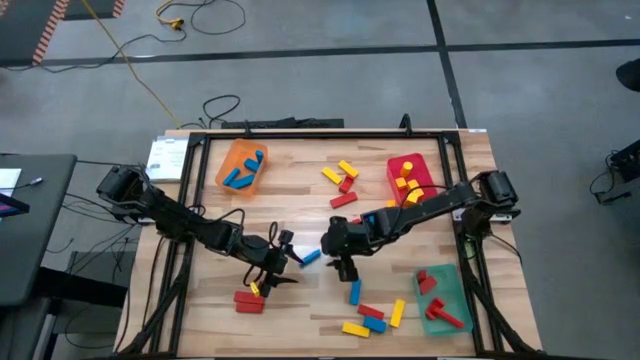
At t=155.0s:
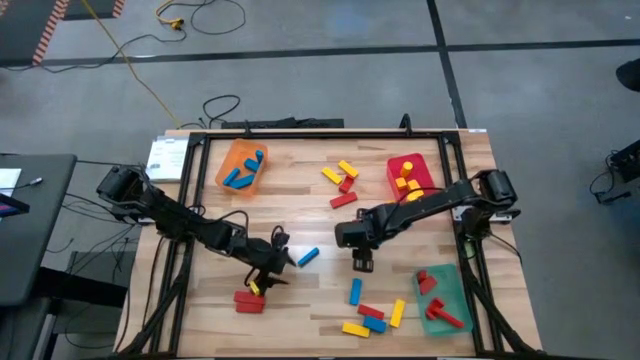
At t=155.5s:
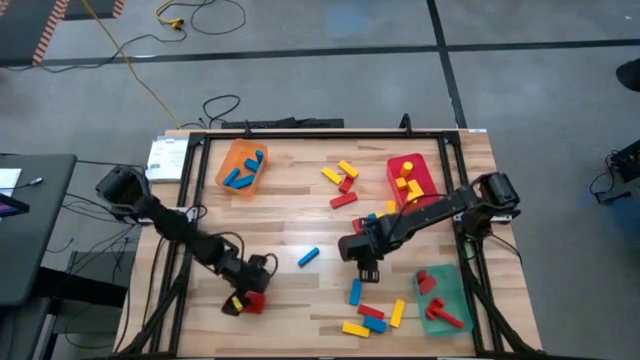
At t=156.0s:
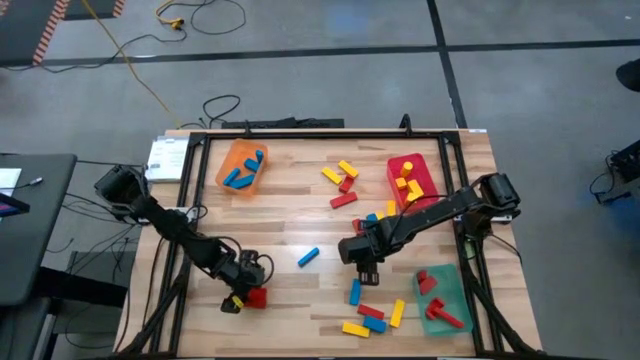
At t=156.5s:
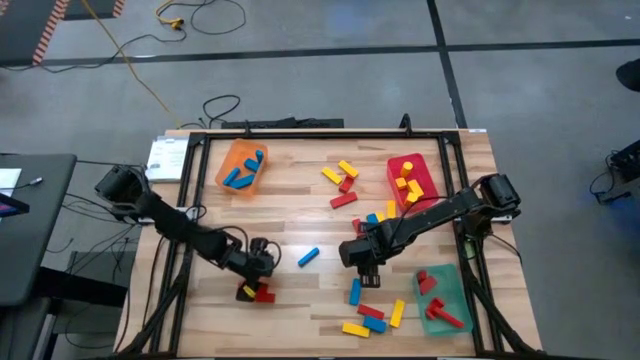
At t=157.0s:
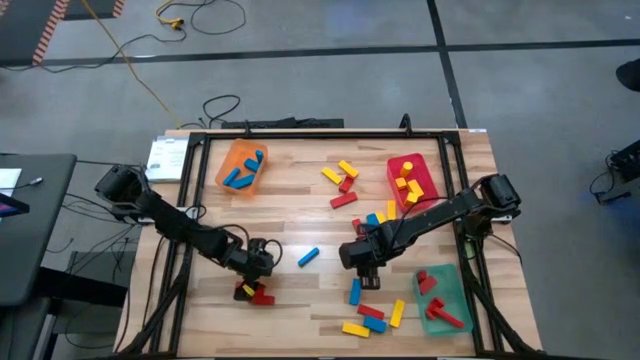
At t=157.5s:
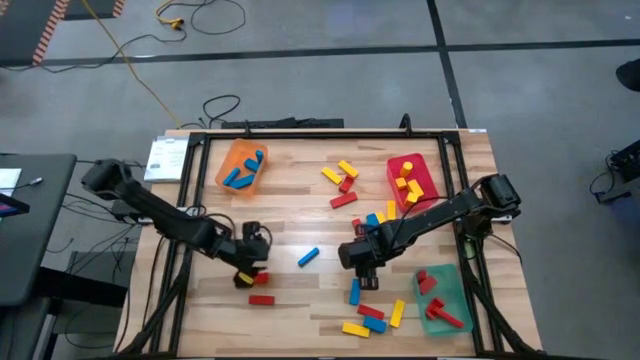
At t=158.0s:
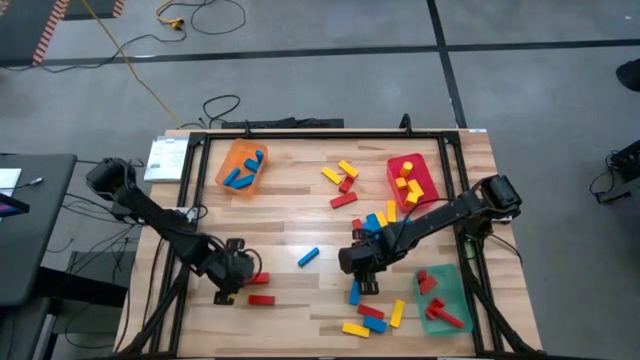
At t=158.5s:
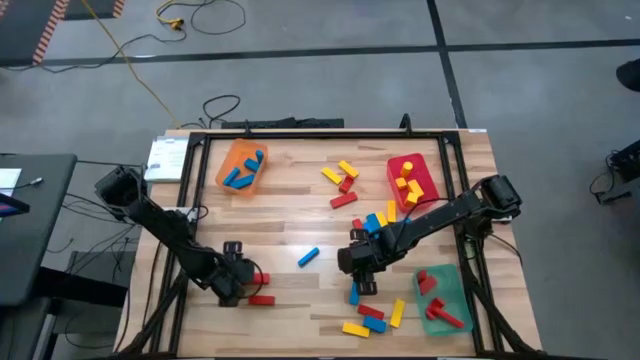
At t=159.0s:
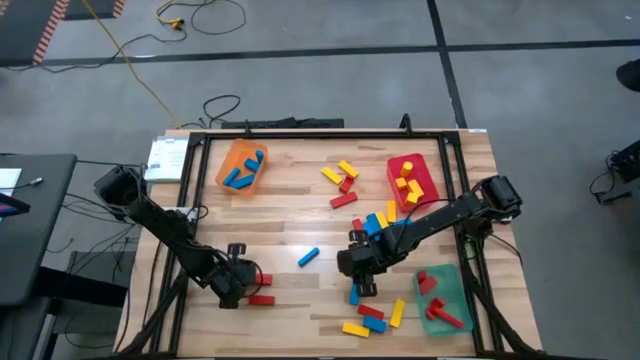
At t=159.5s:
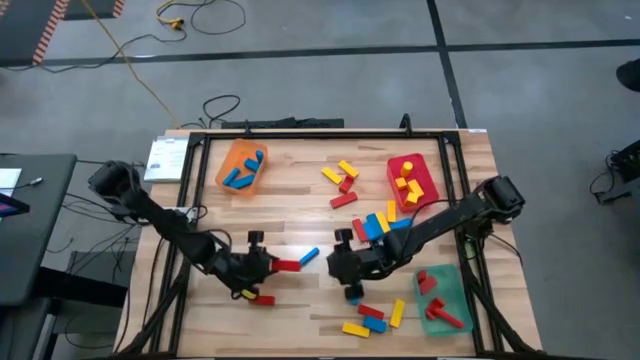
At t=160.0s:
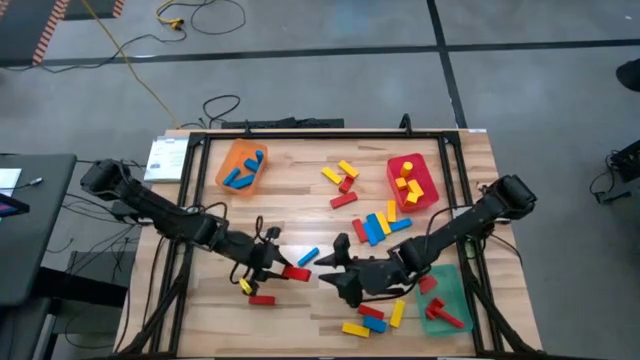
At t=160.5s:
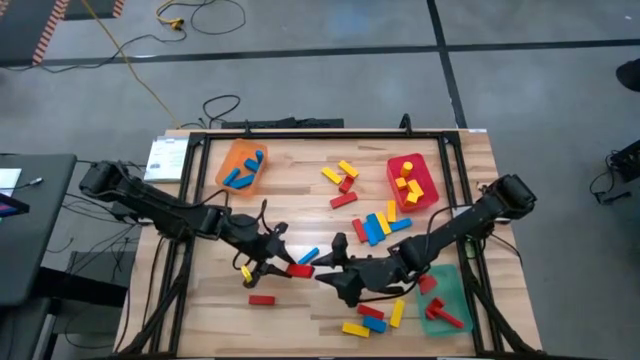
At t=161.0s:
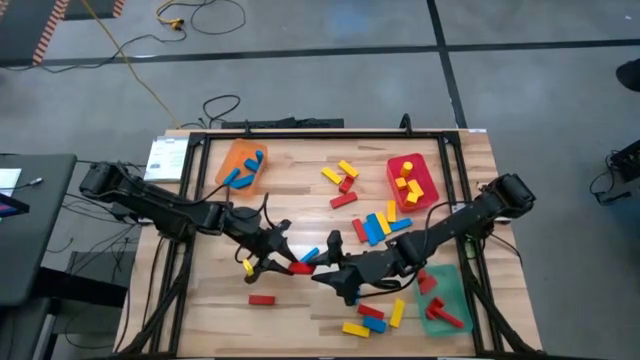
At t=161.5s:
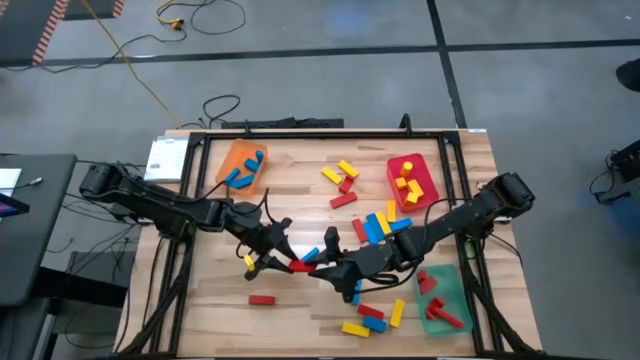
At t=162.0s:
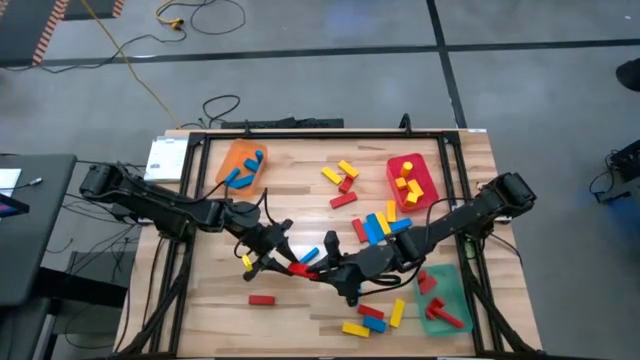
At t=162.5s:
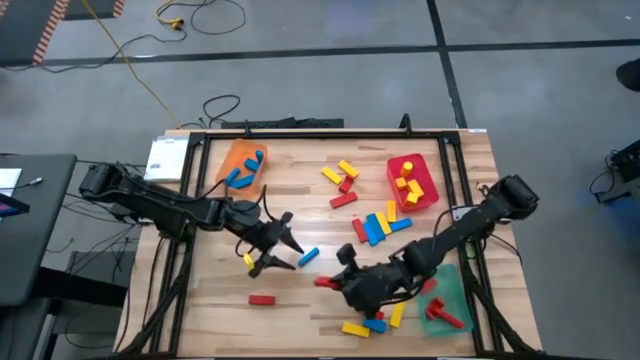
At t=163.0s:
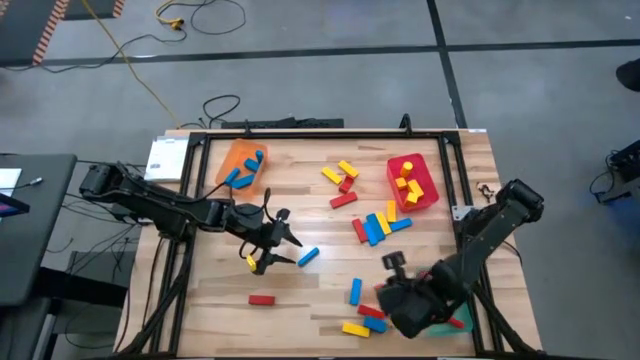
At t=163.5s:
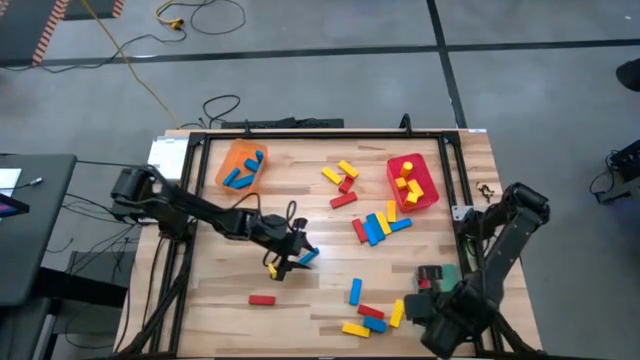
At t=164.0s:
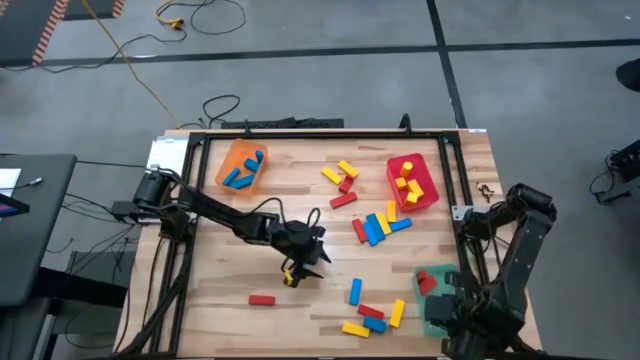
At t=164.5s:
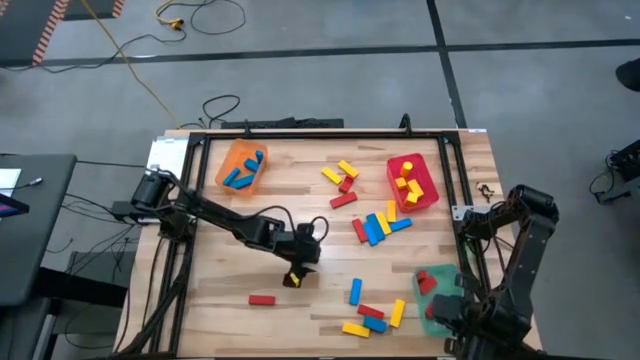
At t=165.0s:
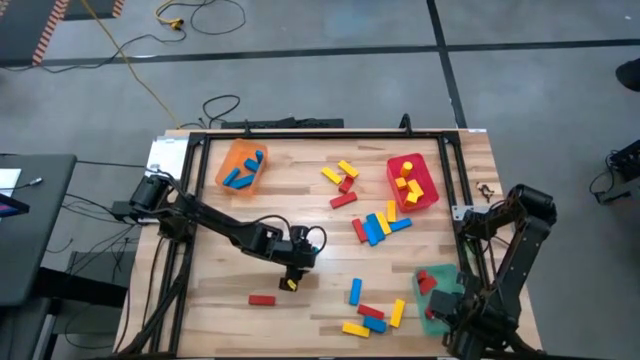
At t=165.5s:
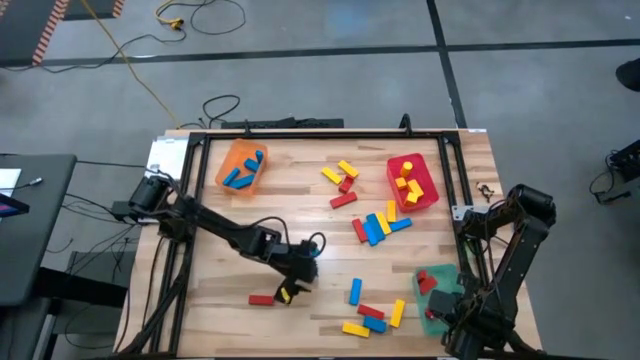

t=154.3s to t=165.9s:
Task: Sort blocks
Put the red rectangle block into the green bin

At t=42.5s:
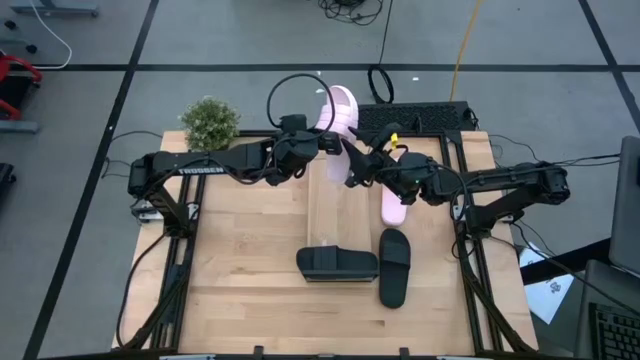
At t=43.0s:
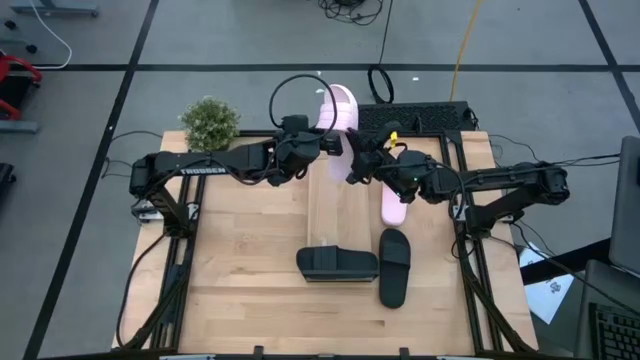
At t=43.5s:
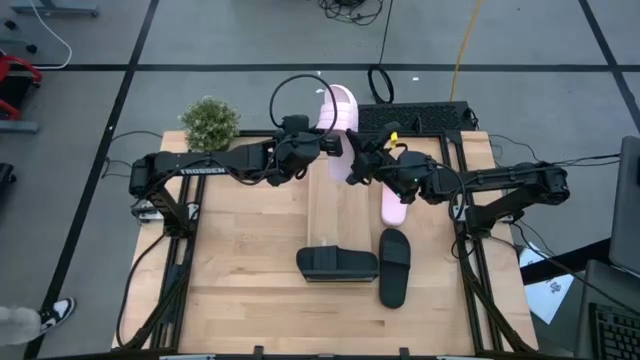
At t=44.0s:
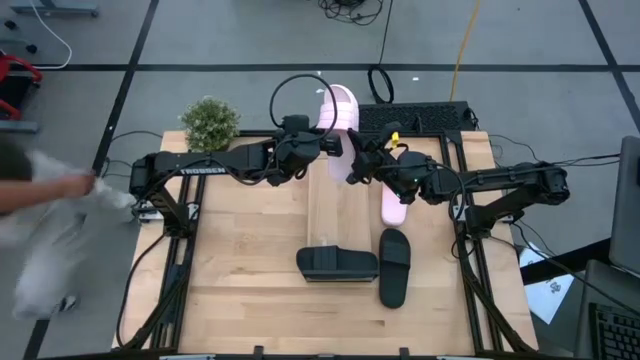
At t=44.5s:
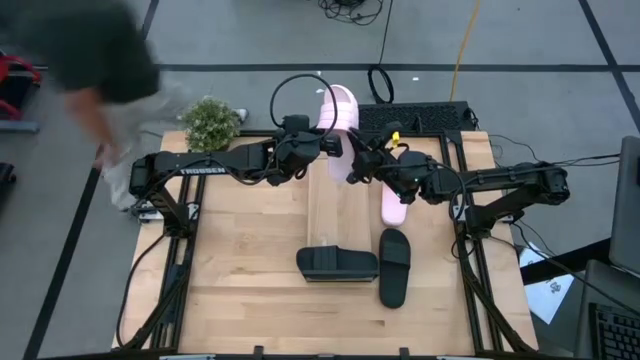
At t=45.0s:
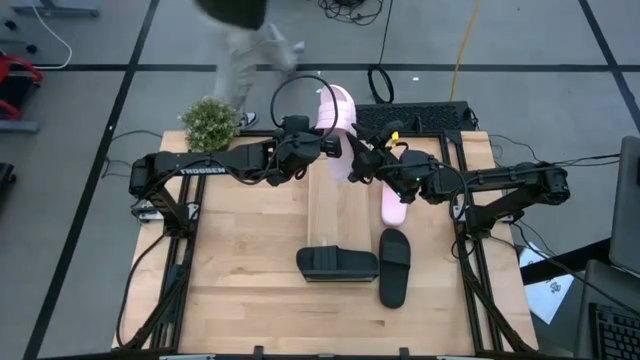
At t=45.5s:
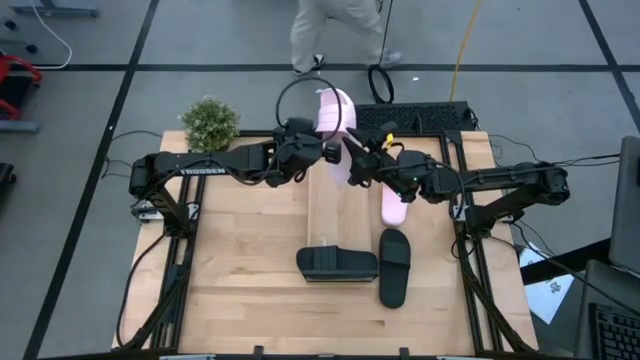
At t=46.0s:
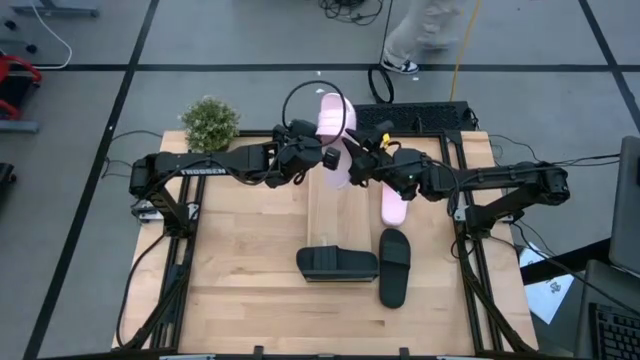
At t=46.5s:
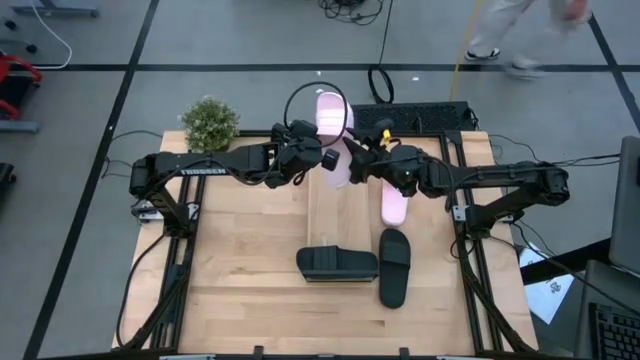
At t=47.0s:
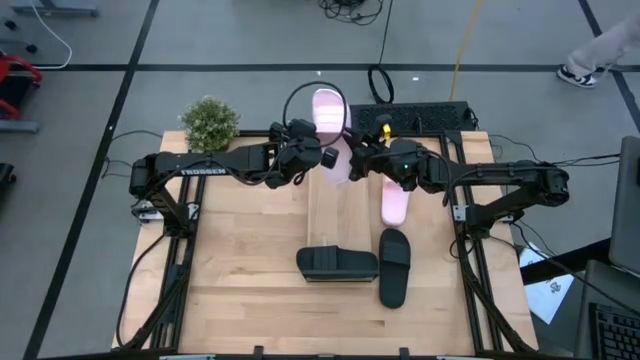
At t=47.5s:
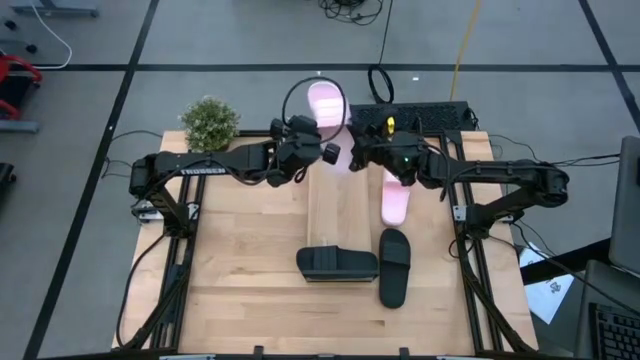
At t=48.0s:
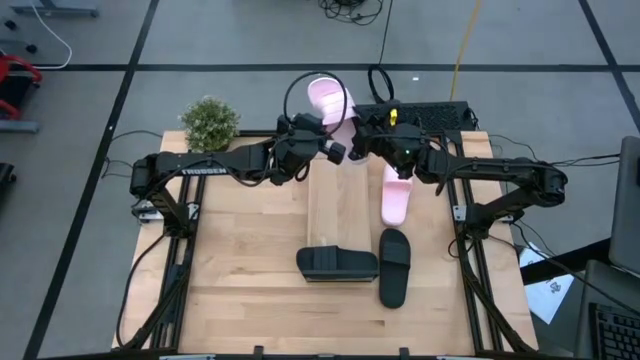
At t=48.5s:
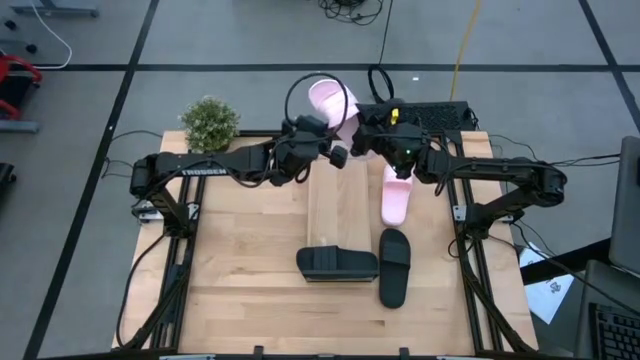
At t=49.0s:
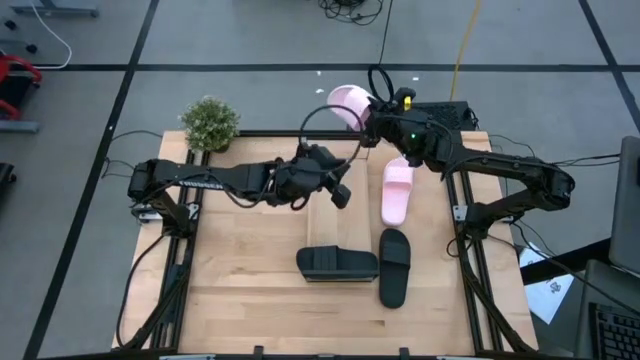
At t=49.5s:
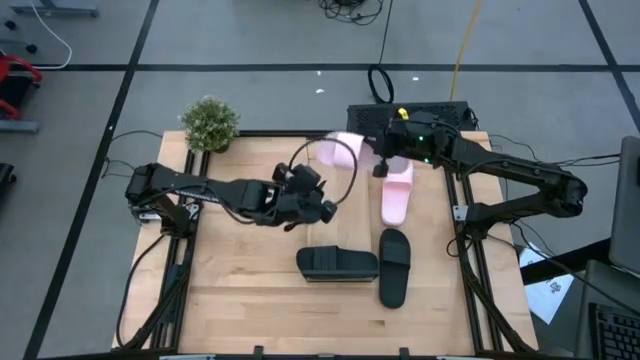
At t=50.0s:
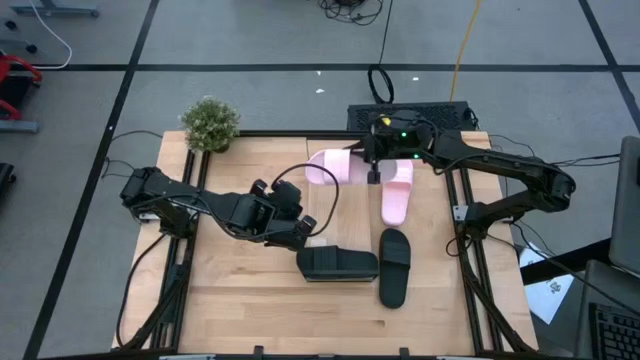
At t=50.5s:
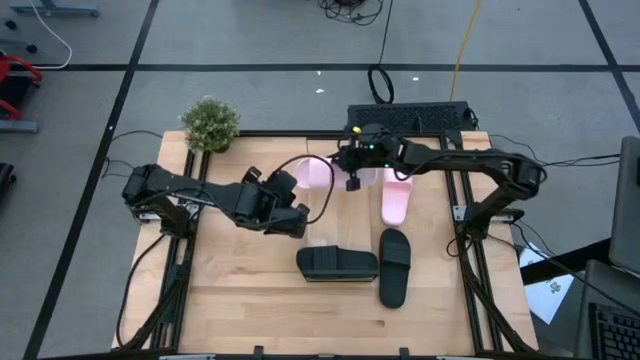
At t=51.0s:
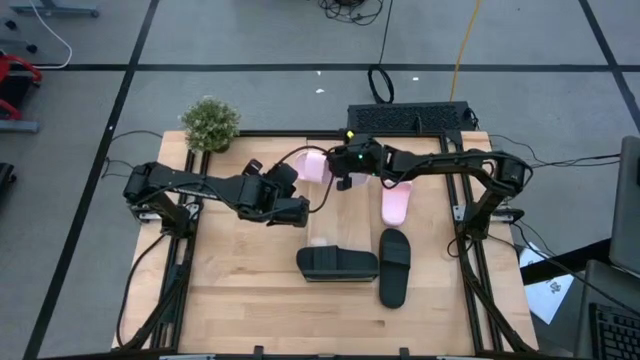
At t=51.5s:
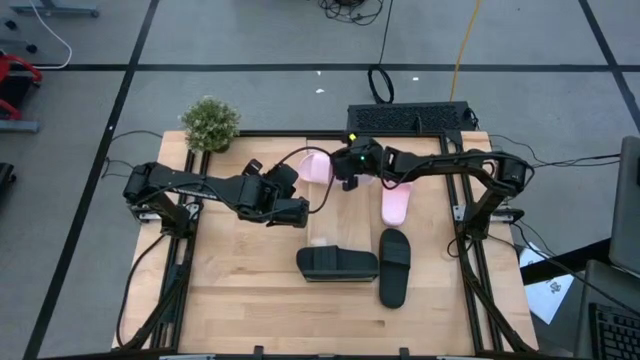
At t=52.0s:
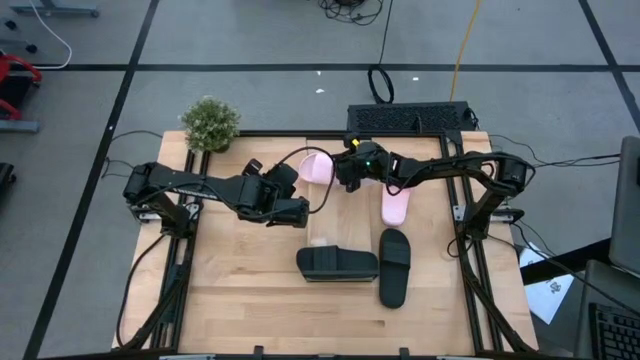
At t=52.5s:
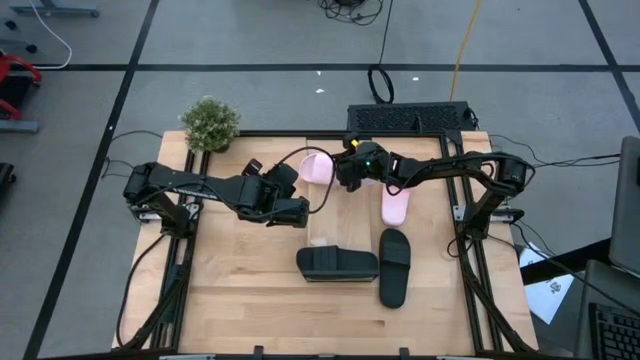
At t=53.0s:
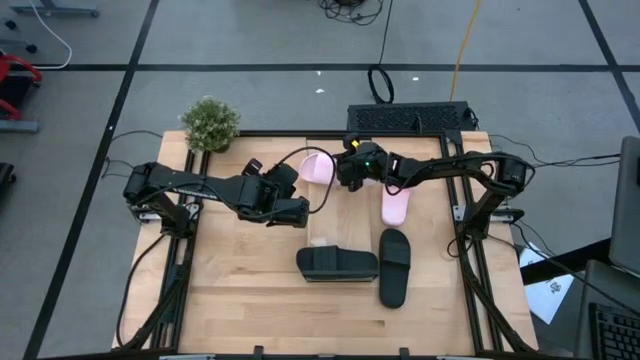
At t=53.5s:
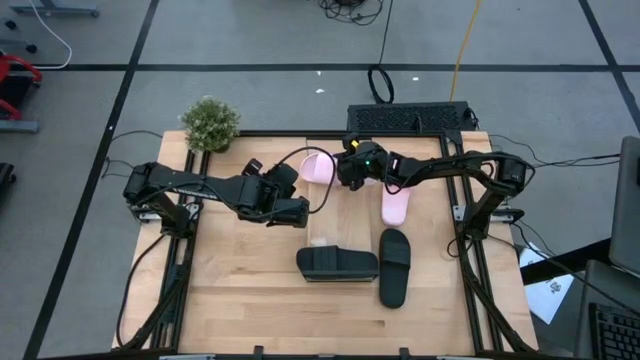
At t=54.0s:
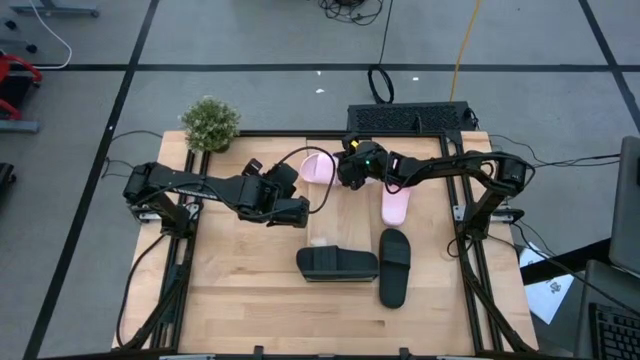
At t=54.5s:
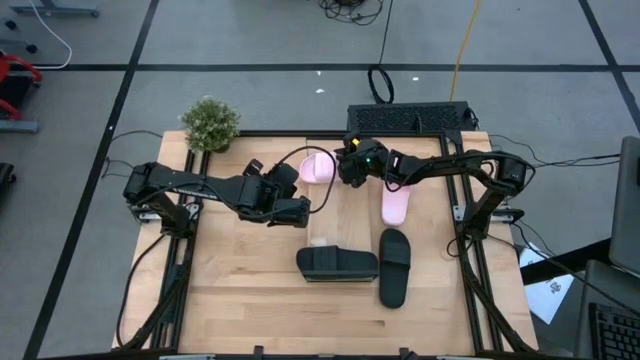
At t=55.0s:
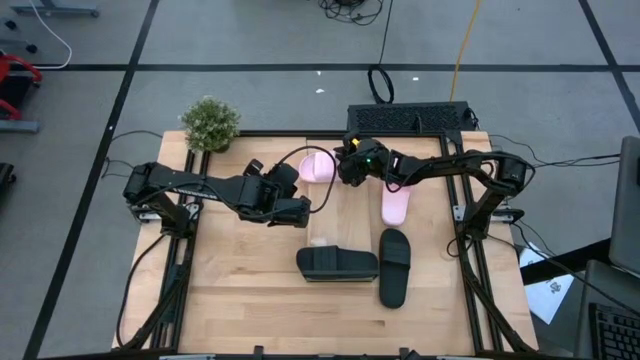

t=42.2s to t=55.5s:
Task: Pick and place slides into the shelf
Put the bottom pink slipper on the shelf
